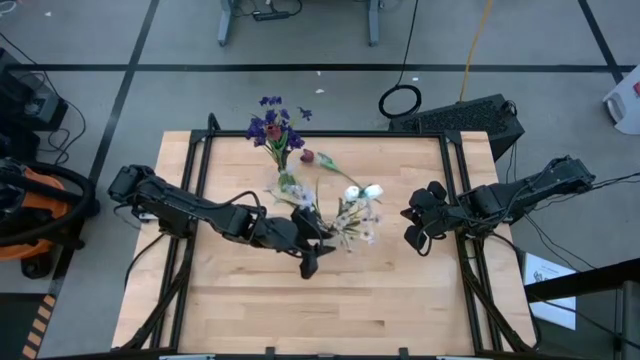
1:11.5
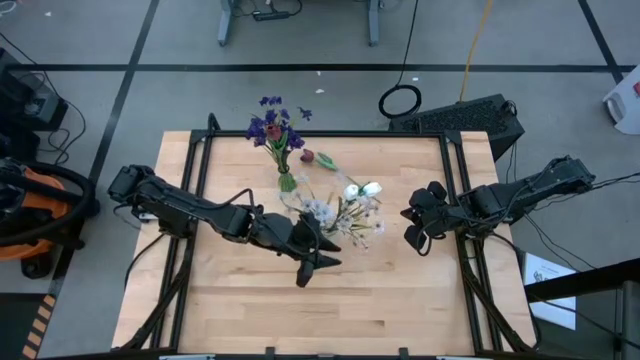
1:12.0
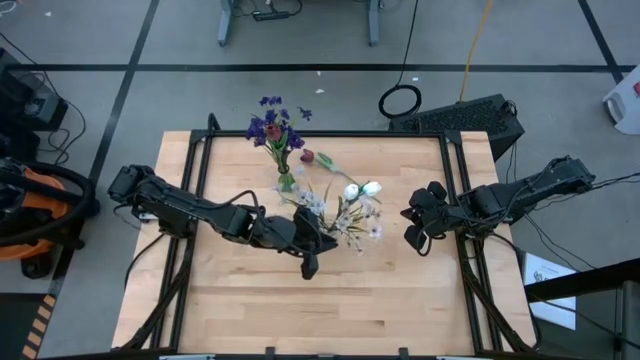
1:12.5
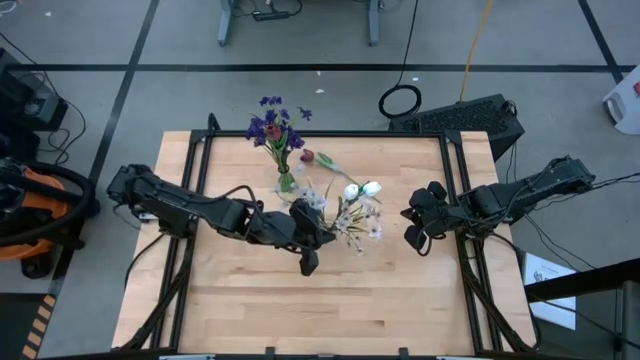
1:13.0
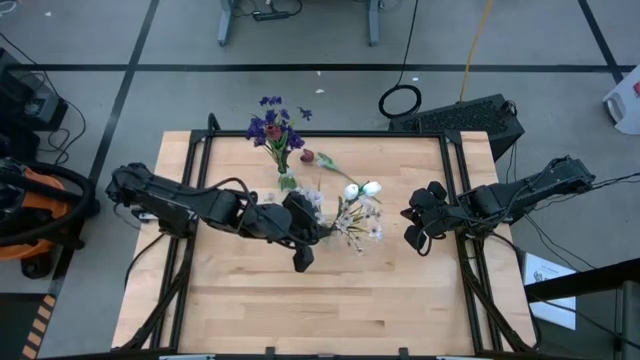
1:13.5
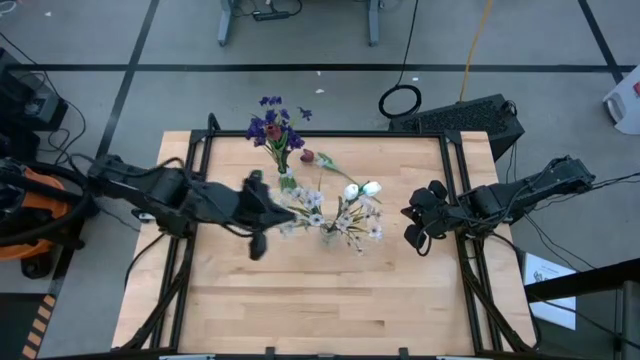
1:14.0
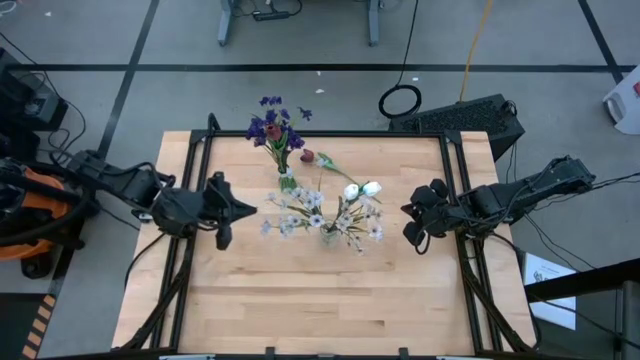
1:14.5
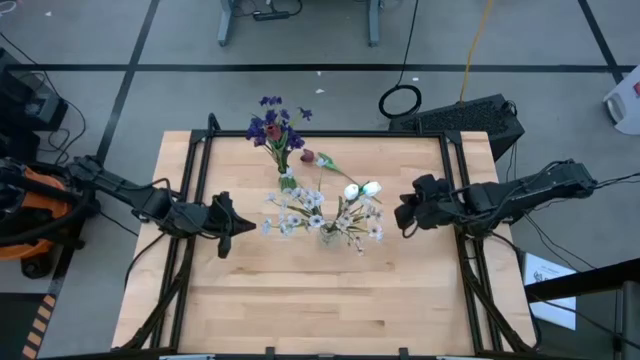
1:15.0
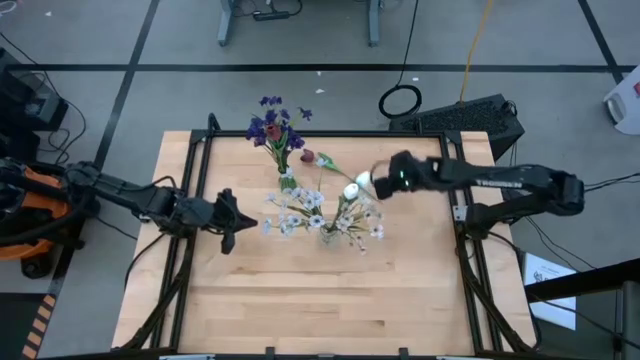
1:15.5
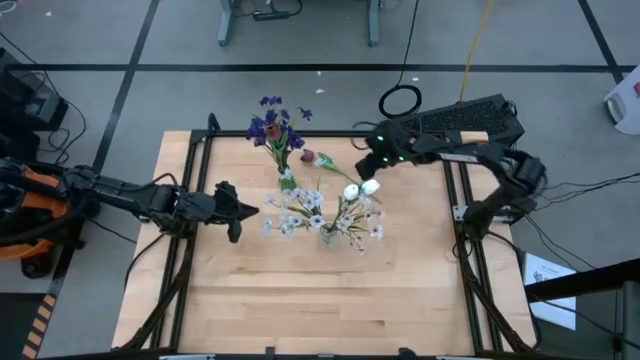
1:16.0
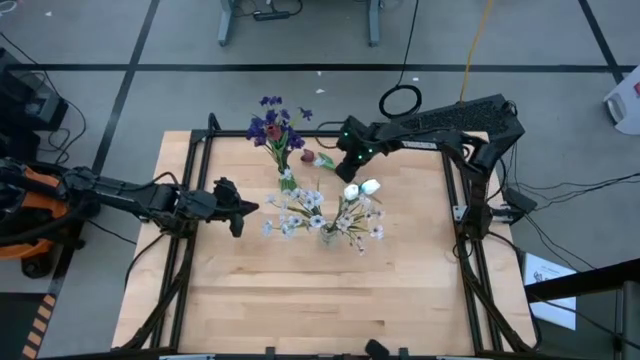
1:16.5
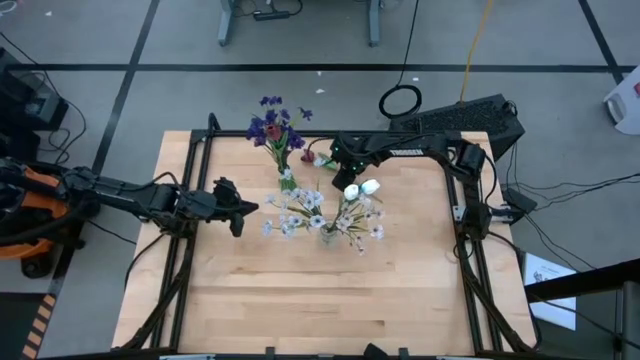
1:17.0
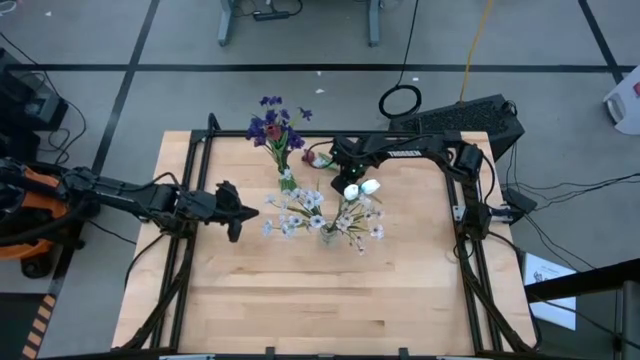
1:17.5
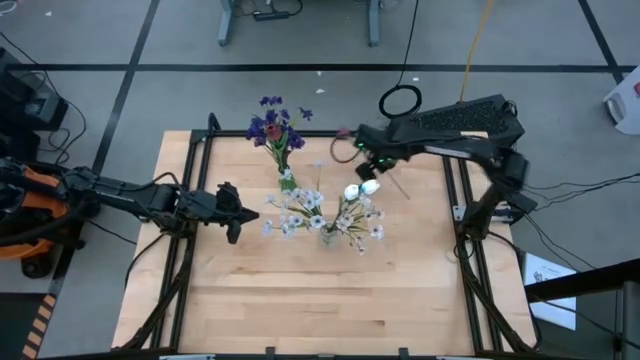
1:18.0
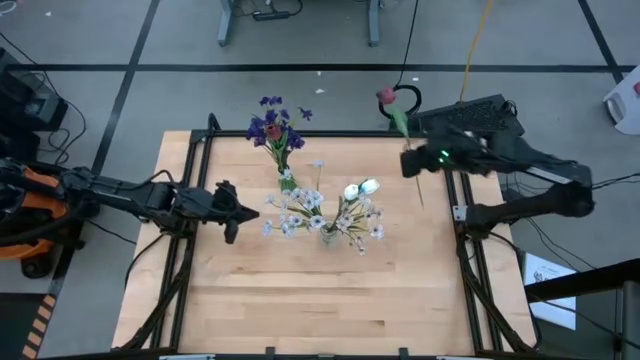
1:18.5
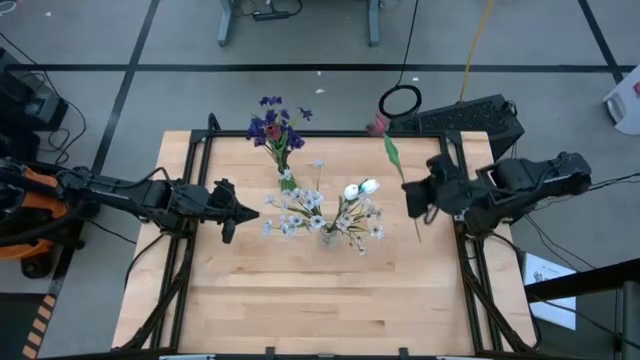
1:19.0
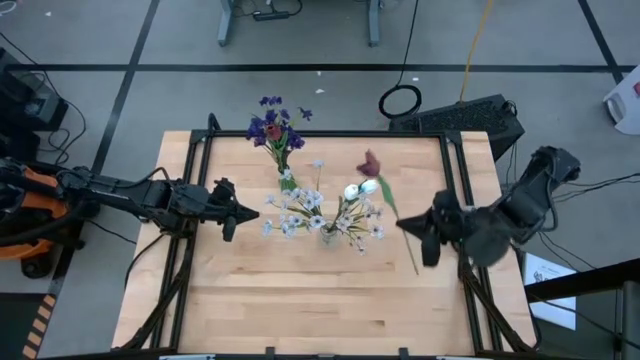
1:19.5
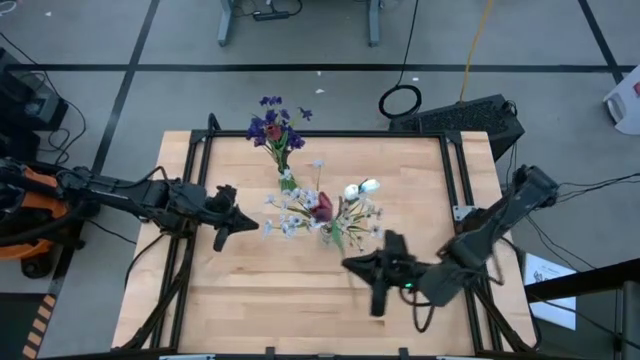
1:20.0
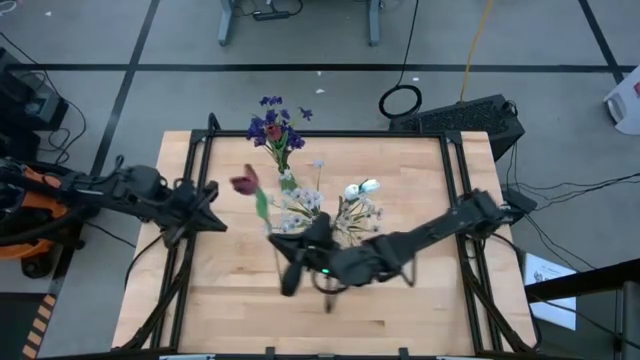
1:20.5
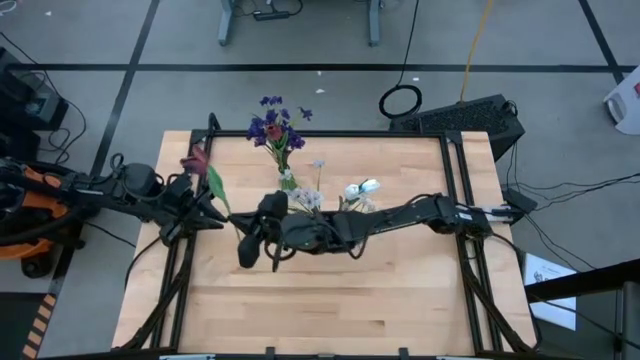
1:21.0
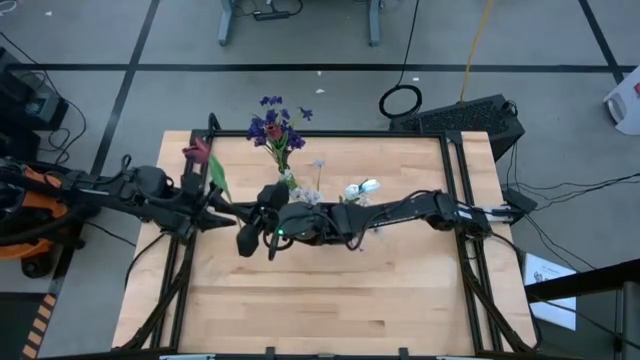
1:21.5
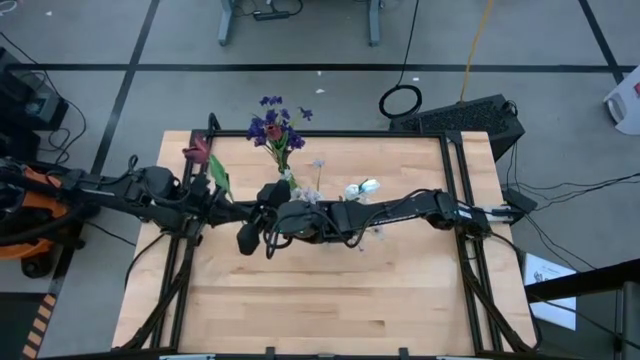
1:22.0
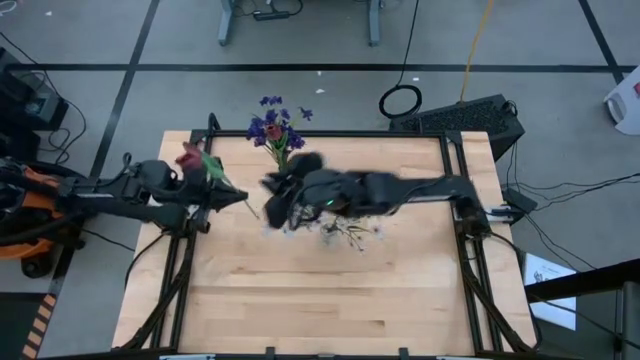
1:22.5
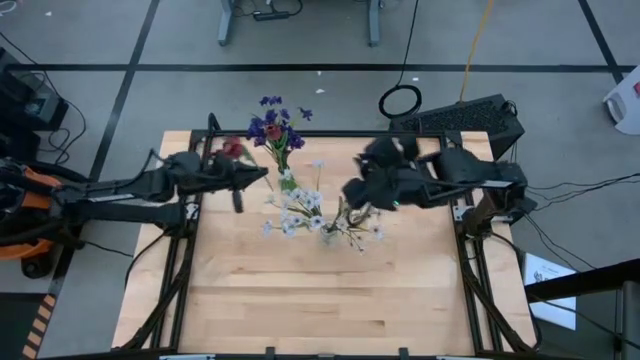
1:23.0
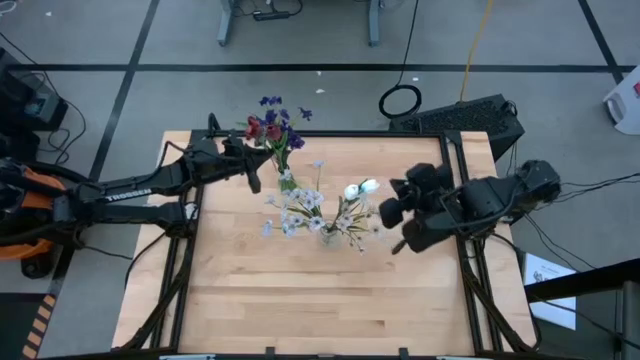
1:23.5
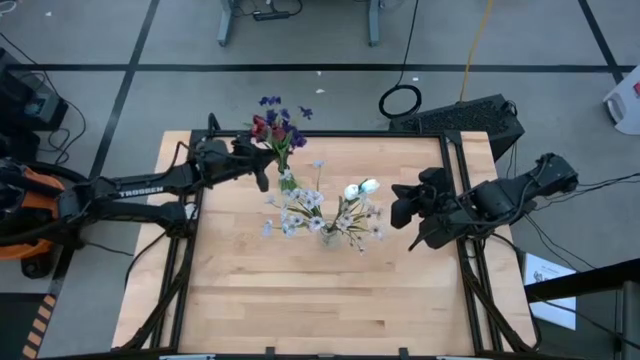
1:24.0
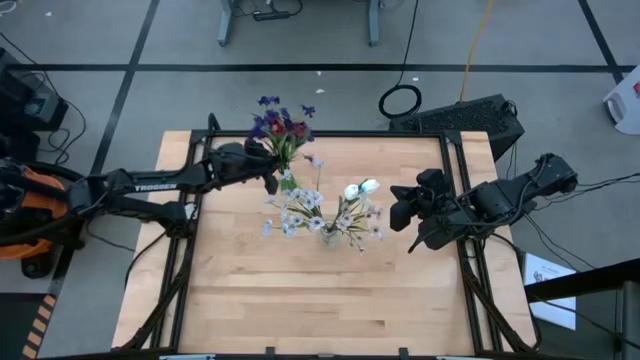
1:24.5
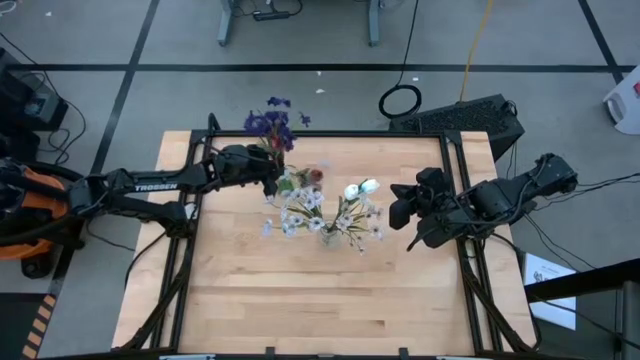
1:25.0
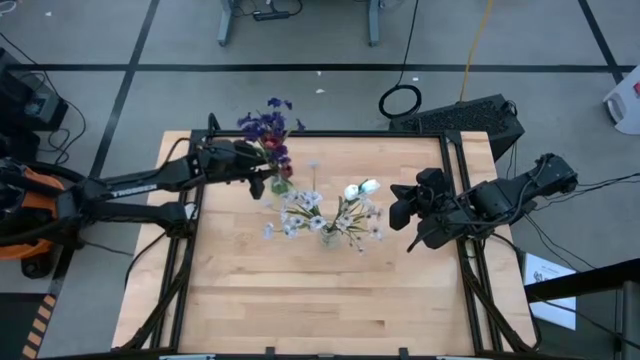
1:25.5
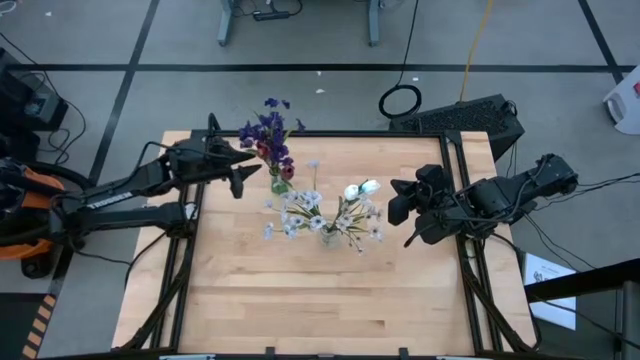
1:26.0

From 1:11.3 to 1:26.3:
Task: Sort flowers into vase by color
Put the red flower into the green vase

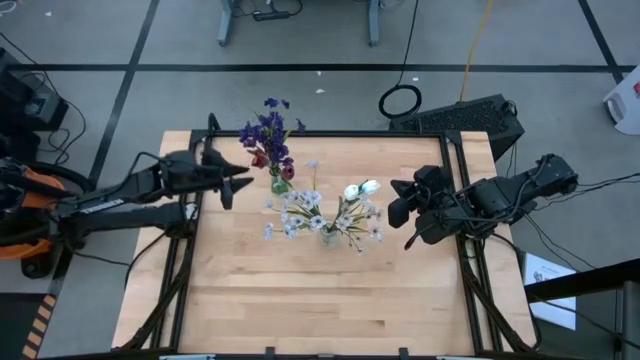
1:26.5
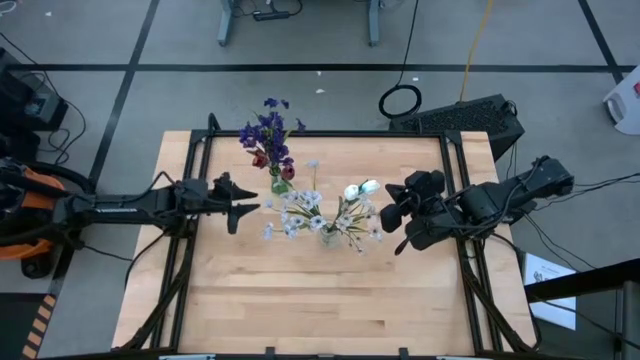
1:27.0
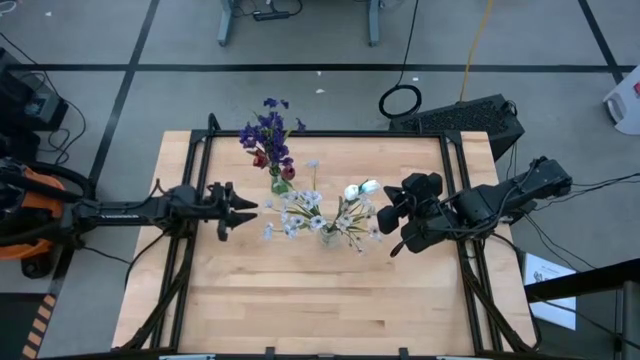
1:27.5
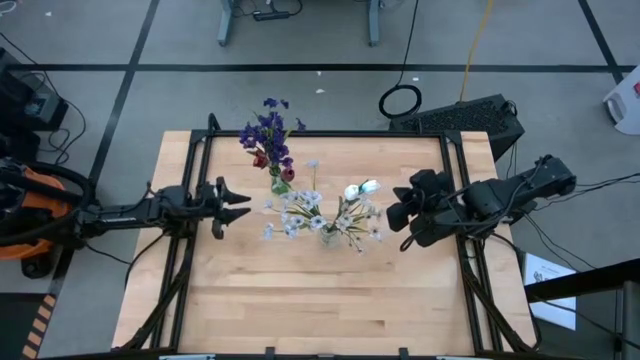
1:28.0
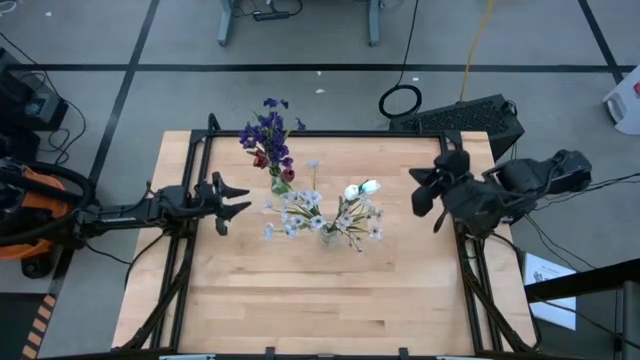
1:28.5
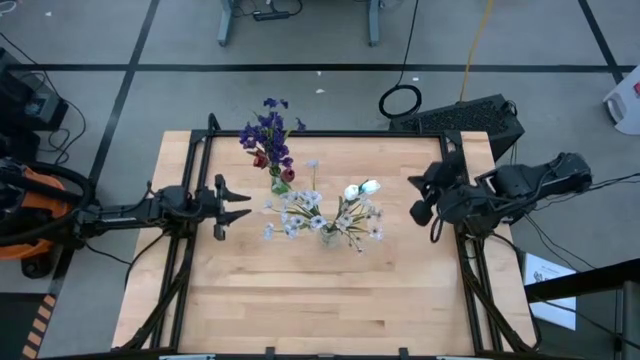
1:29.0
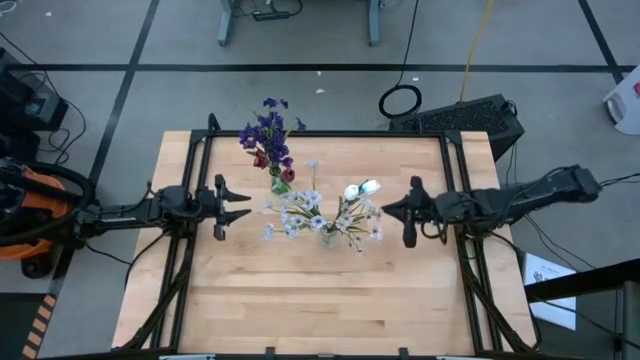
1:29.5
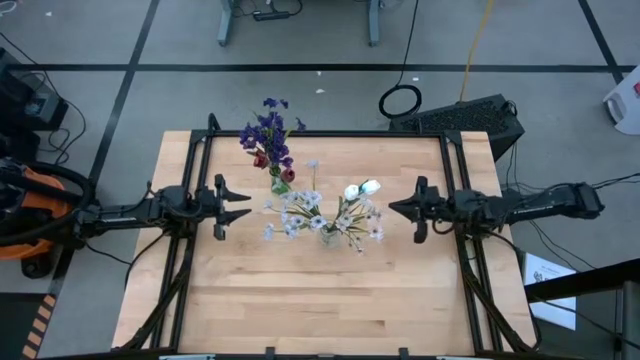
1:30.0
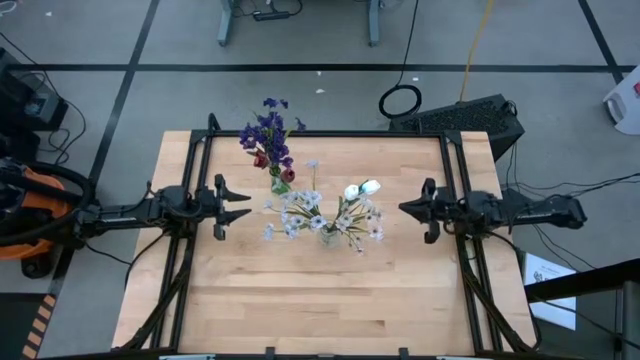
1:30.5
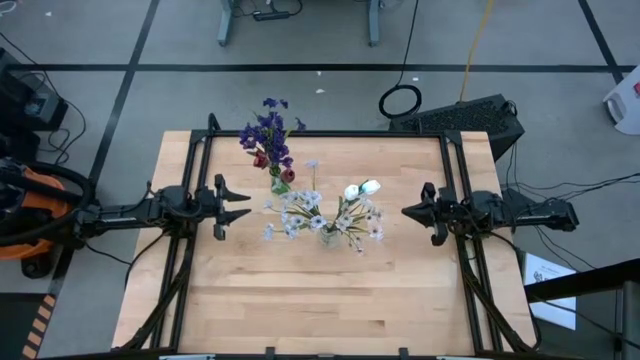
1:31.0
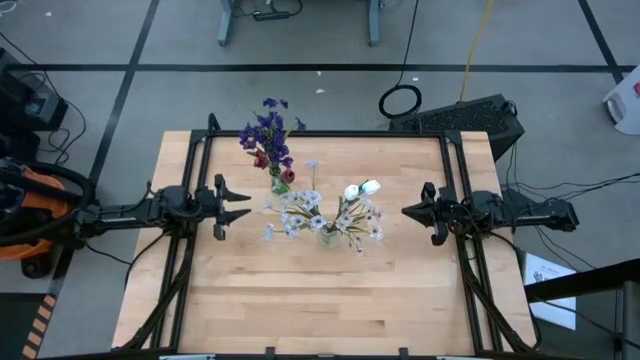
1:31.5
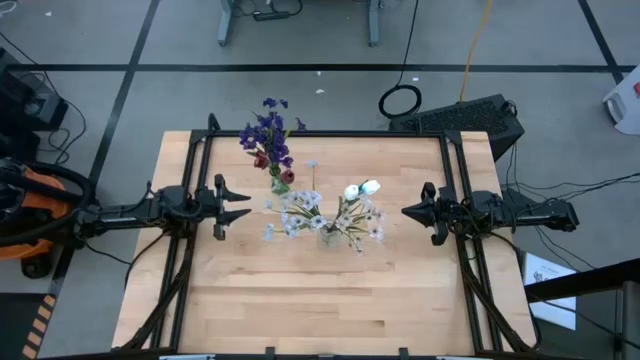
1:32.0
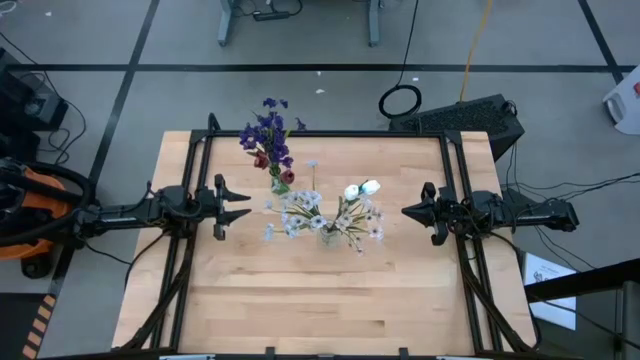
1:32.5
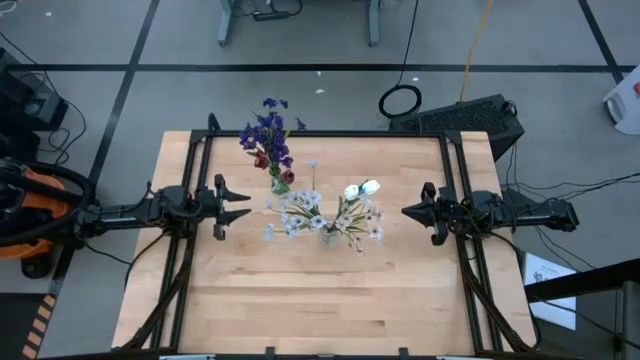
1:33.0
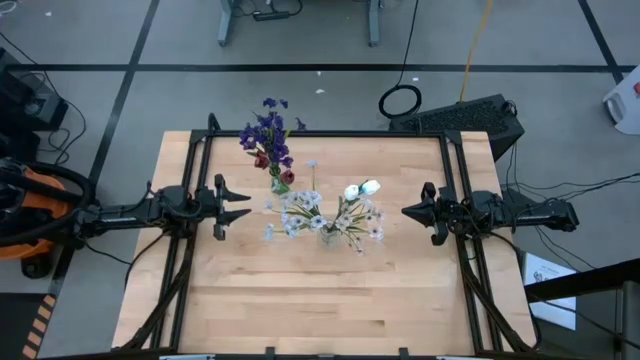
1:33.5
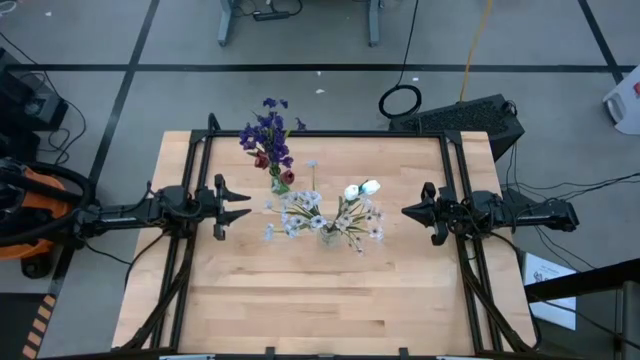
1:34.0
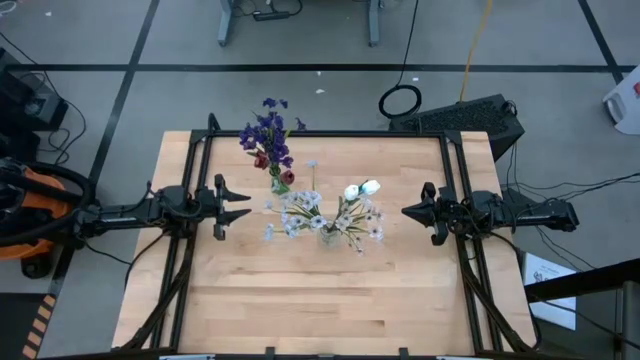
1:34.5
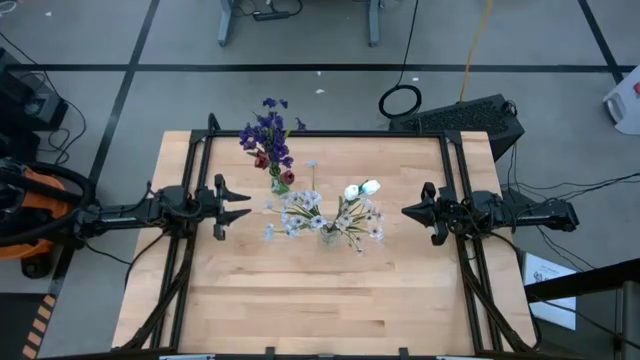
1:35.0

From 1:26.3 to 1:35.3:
Return to Home Position
